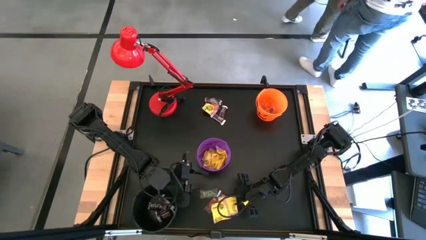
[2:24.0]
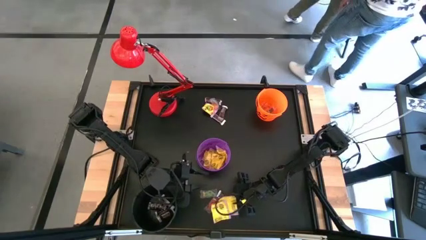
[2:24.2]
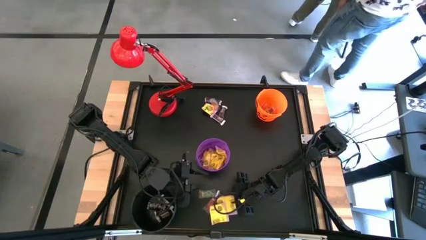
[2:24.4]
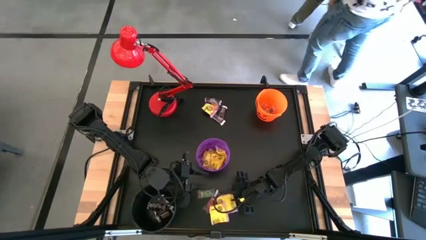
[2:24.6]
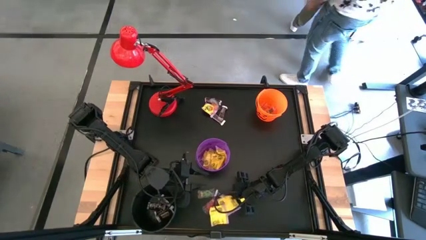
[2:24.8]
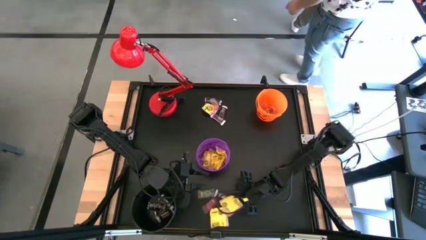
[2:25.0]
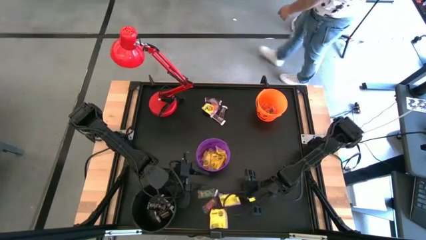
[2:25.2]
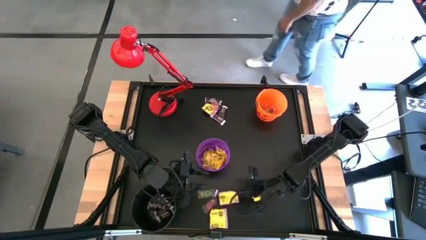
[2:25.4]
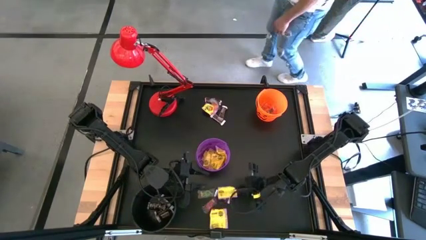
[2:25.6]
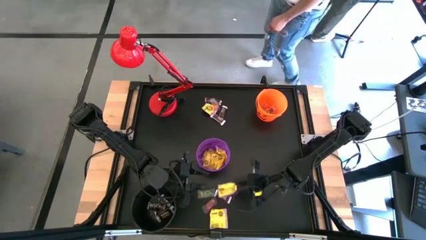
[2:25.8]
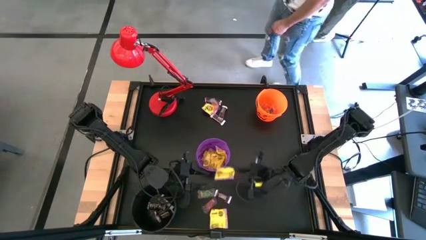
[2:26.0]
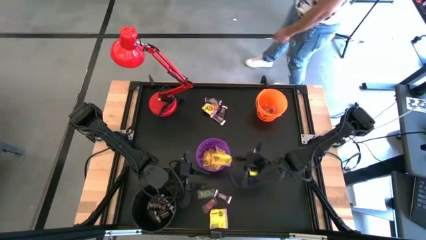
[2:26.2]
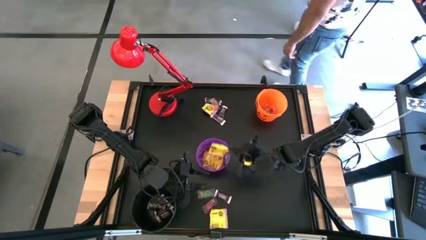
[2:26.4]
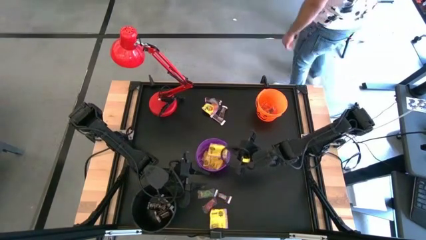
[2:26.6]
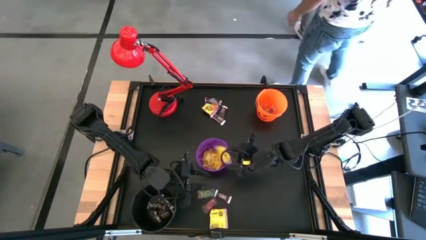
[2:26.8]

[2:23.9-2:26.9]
Task: Sort candy
Put the yellow candy into the purple bucket

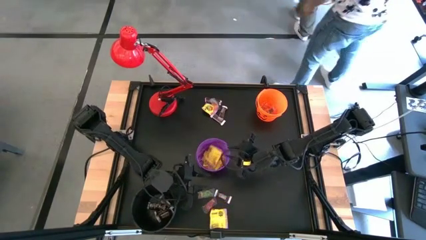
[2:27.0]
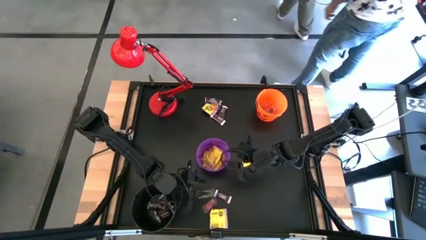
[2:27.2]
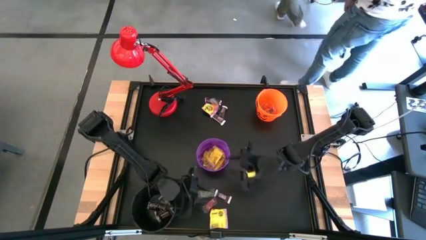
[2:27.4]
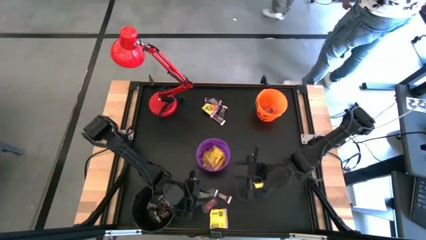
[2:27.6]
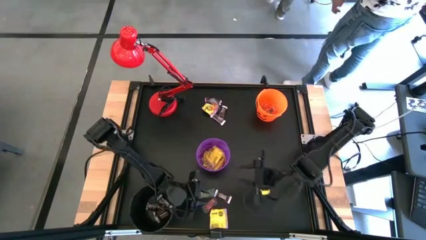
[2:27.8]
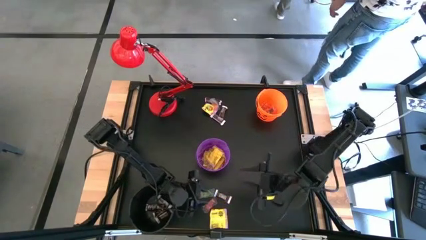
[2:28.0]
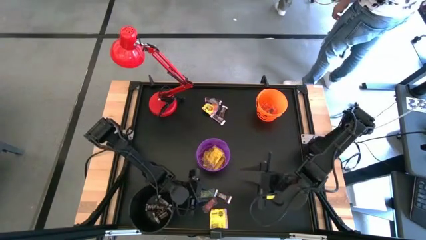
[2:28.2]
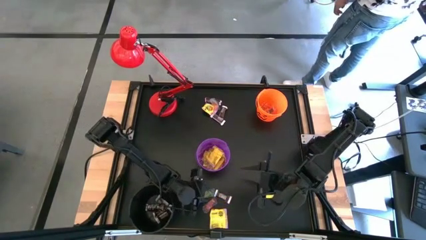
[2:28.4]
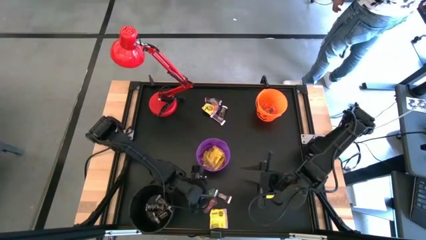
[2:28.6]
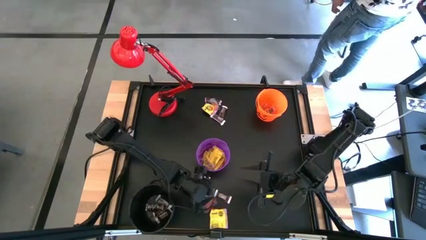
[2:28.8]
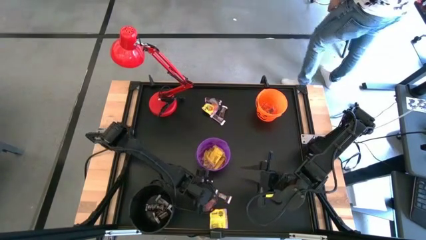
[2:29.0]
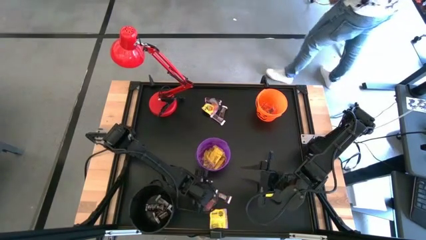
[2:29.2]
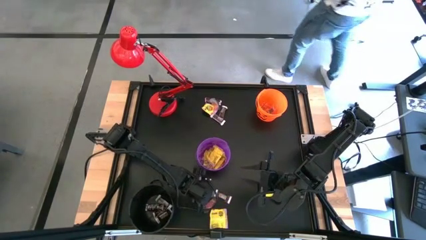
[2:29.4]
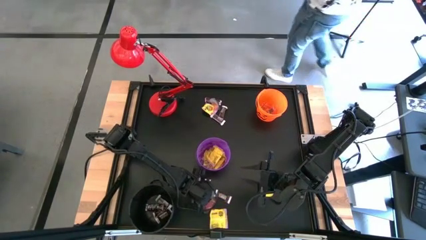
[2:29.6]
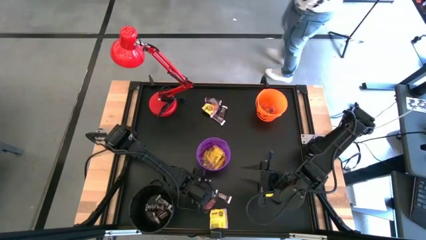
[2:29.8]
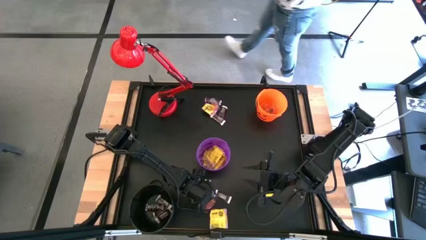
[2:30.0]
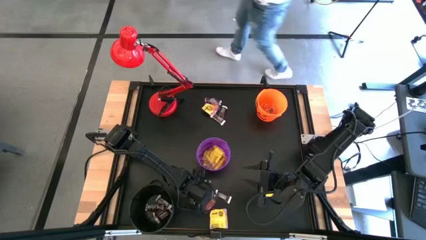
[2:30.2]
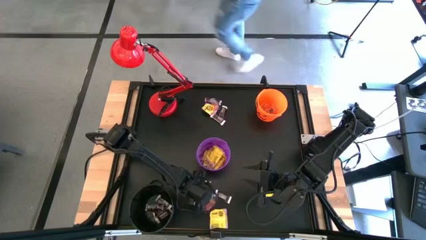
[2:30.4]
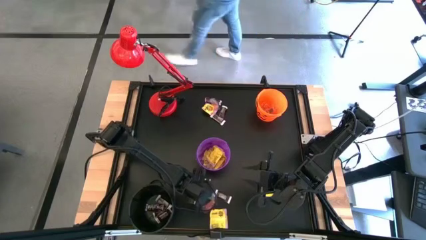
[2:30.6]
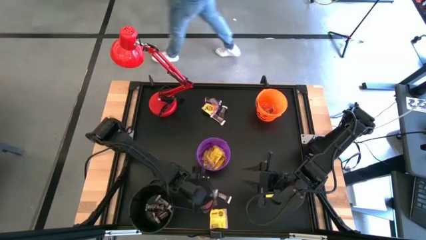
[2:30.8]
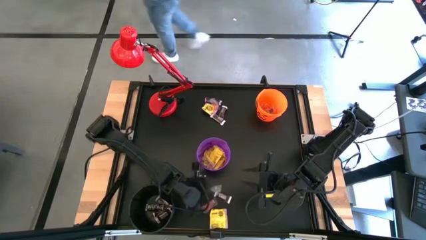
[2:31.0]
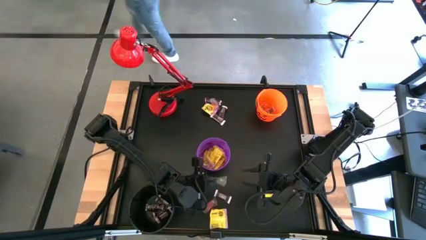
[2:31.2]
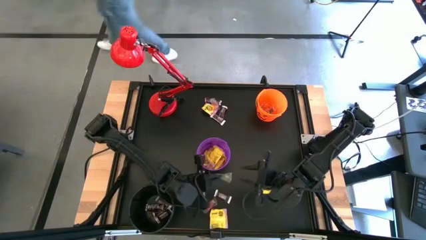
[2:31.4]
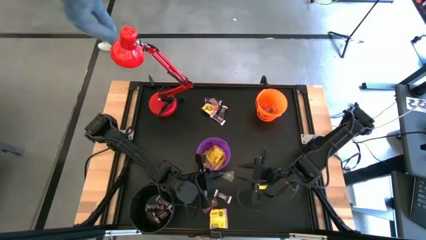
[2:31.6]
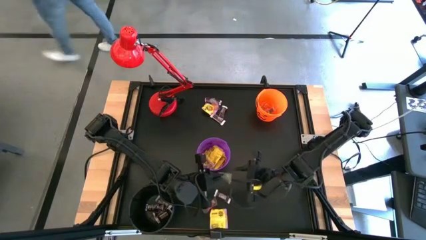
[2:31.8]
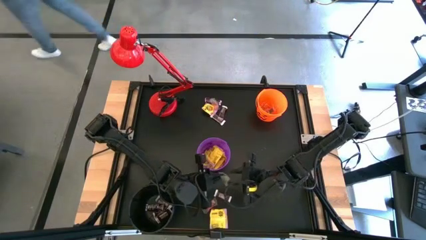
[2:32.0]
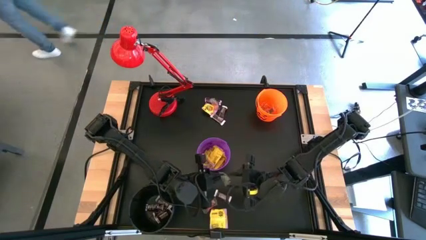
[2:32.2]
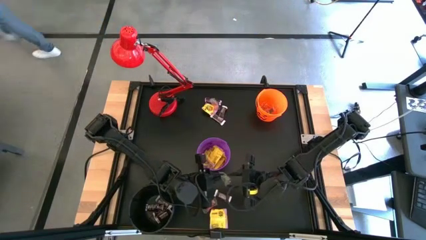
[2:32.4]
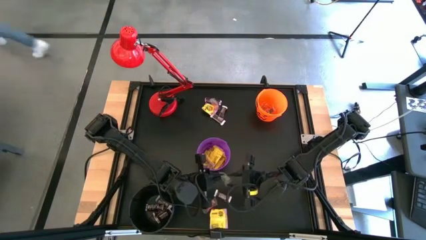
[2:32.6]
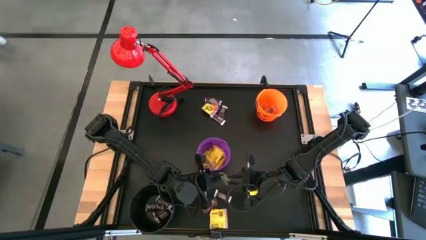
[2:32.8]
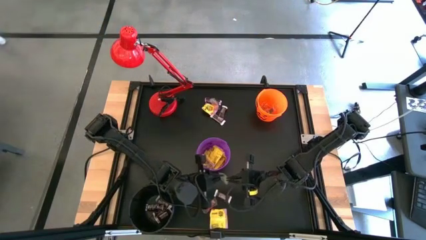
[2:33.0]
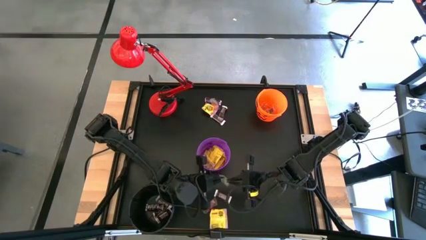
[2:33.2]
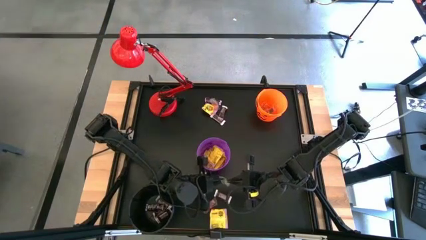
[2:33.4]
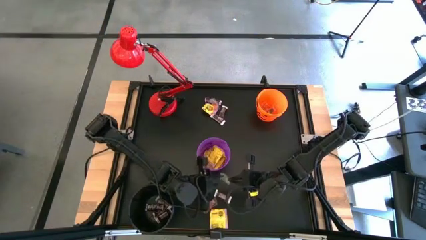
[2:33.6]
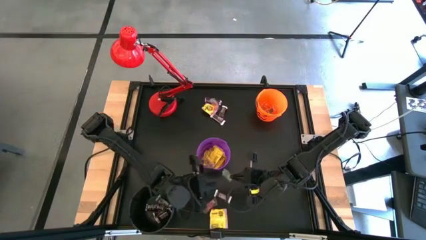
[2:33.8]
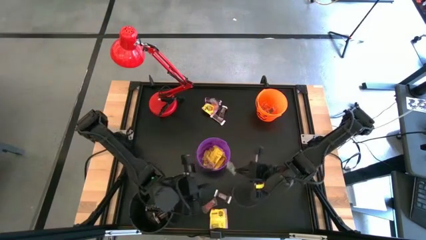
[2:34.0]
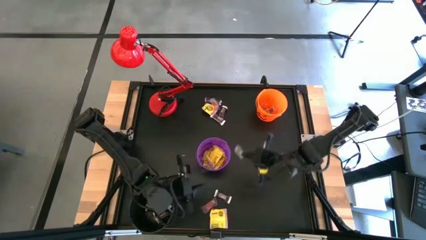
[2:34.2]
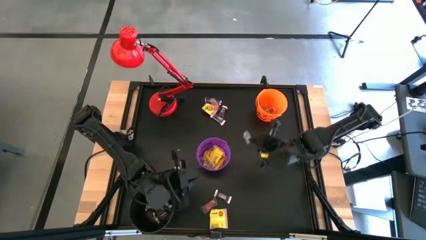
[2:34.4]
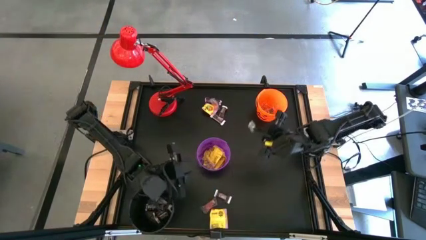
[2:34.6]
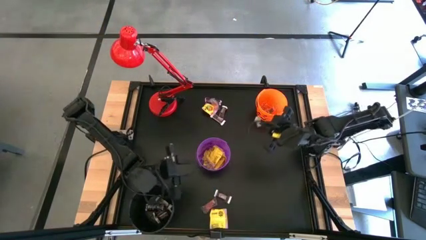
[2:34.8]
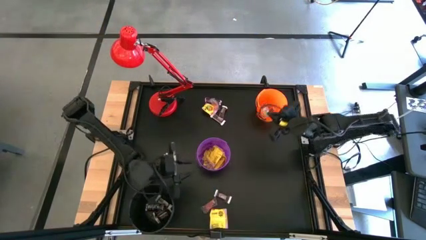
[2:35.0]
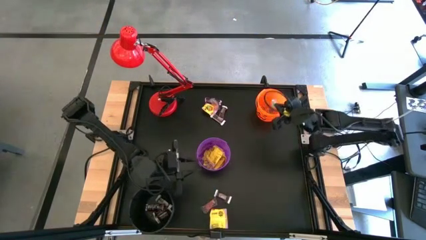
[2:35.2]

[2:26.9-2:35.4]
Put the green gummy into the orange bucket

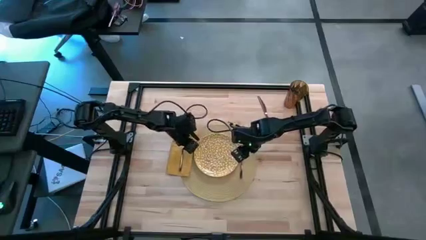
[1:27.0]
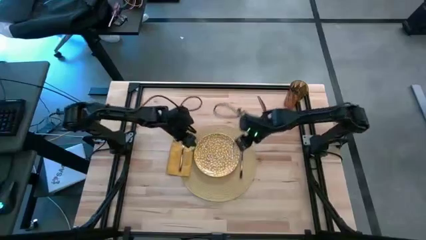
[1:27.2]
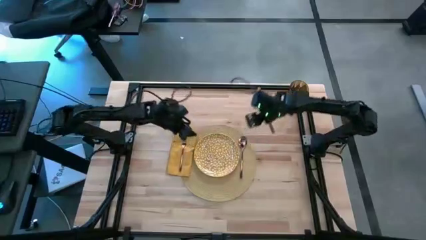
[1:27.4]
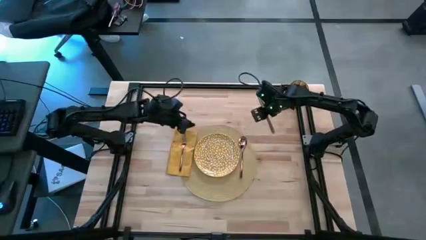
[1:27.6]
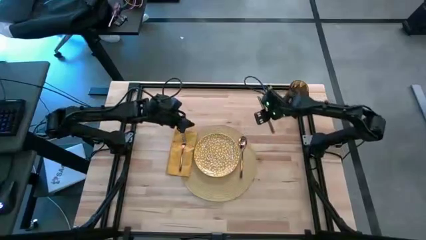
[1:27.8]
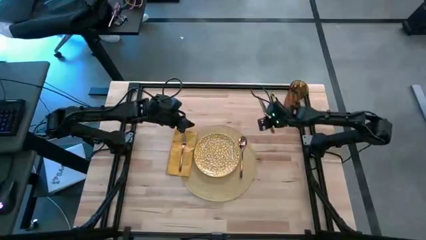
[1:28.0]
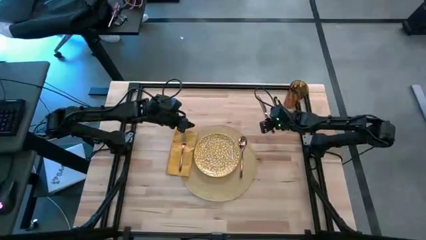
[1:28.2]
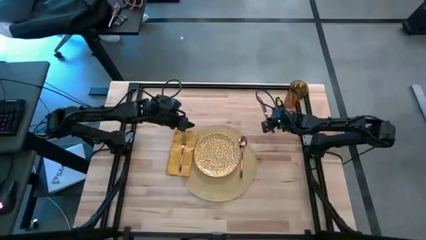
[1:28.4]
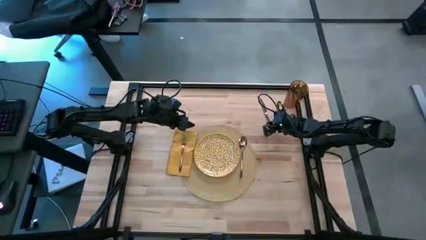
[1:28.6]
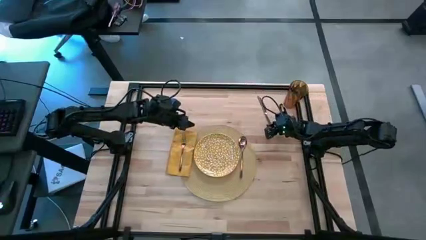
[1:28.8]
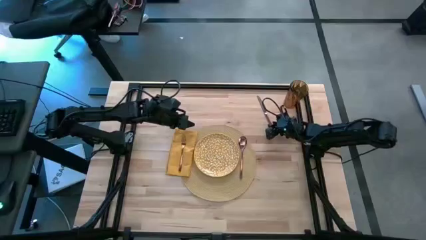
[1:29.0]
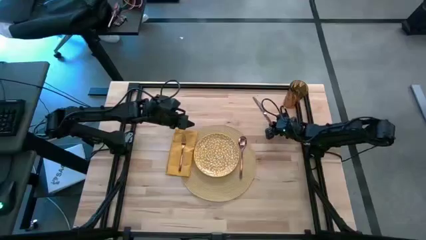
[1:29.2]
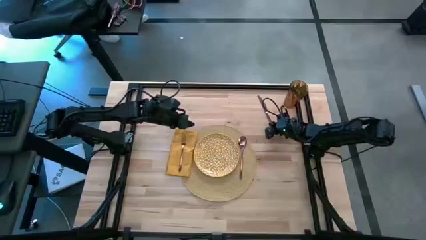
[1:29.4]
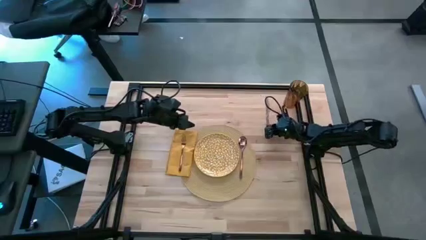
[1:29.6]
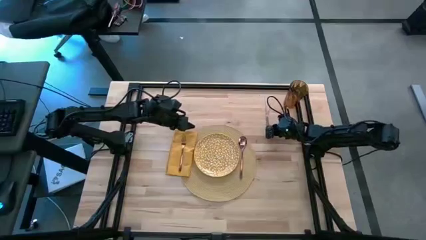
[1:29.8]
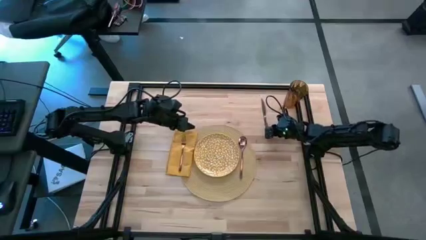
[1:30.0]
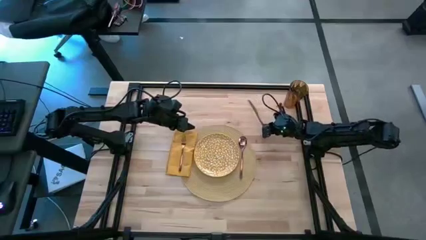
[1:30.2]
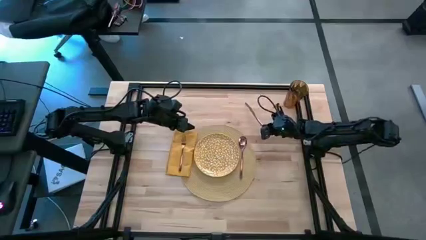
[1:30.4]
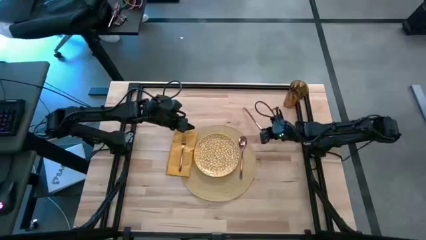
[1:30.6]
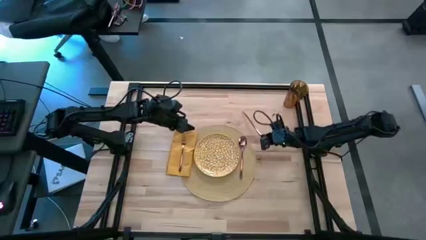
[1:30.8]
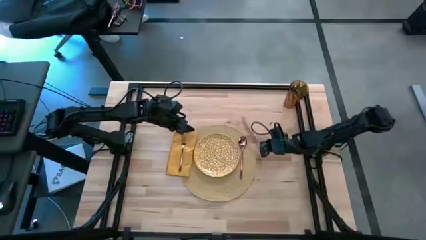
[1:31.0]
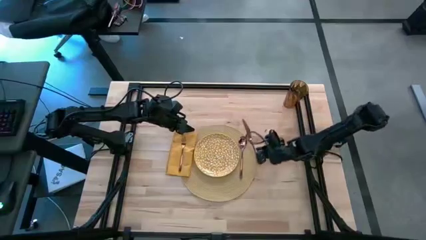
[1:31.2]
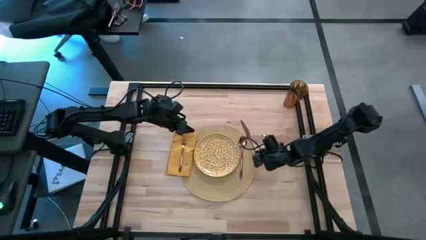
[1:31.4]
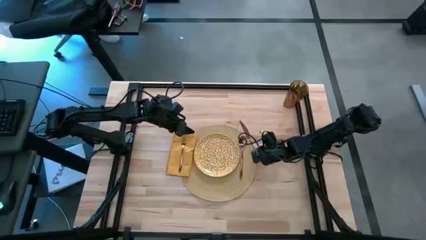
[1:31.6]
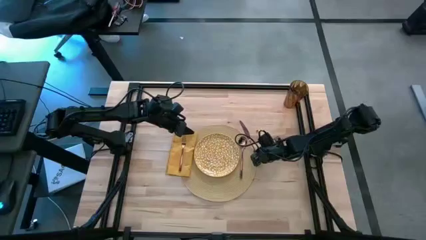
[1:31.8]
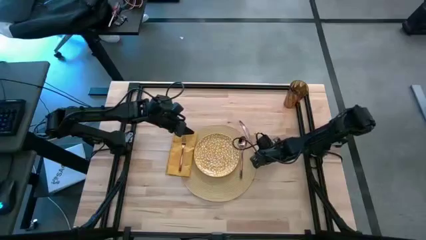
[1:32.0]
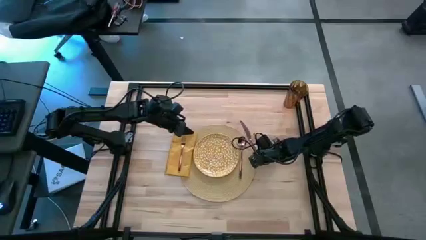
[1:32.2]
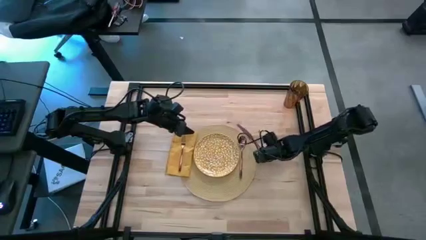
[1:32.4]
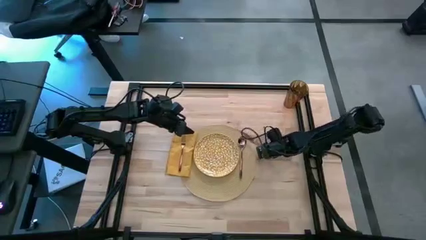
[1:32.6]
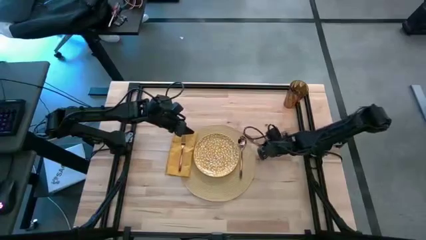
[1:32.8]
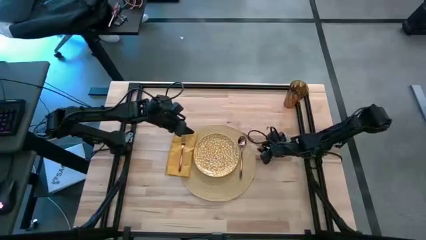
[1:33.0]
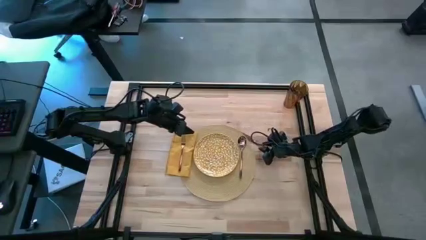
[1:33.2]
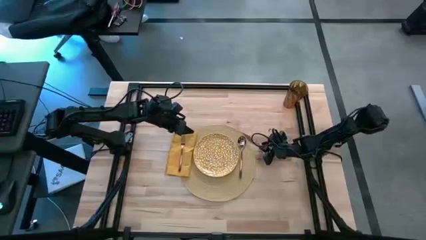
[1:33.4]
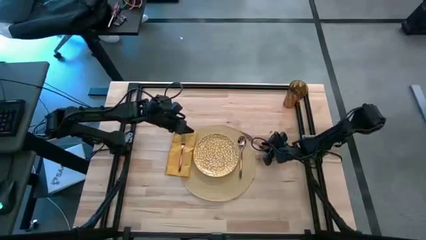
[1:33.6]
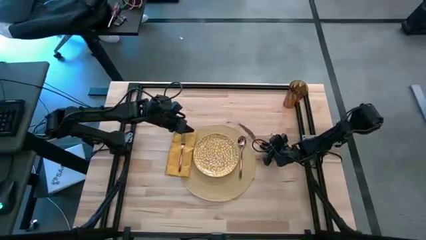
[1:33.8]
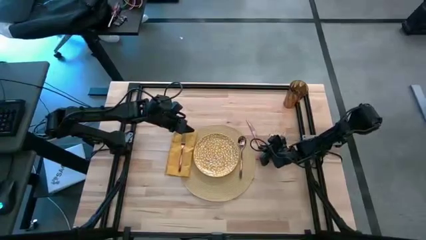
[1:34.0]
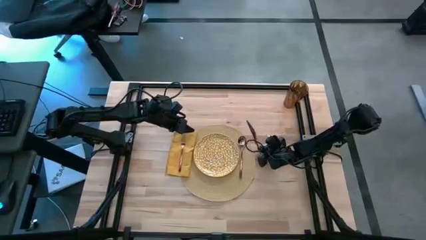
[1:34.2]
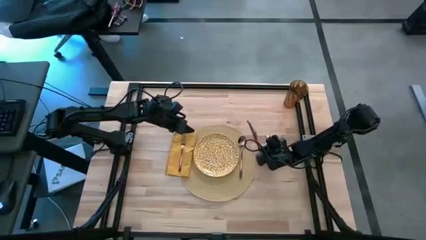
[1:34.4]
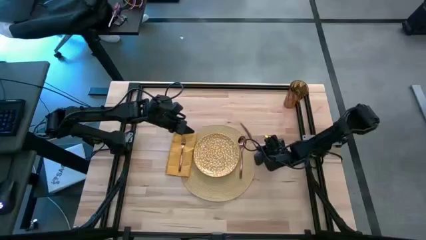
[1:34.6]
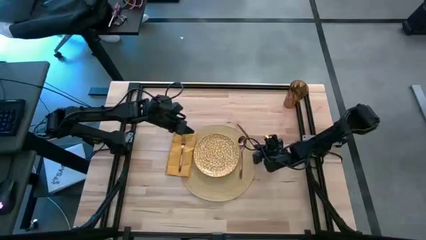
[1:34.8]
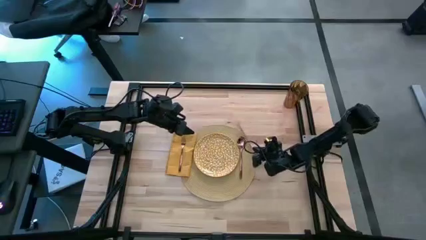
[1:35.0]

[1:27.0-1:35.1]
Task: Set table place
Put the brown knife on the brown placemat
